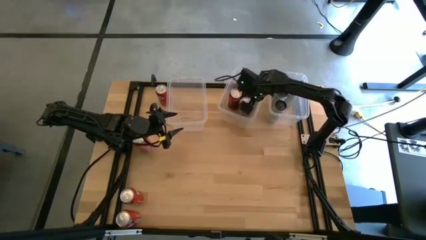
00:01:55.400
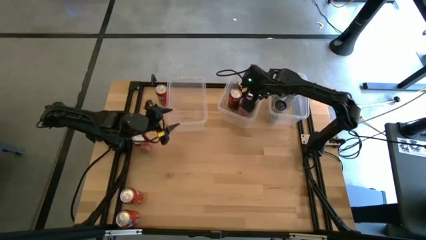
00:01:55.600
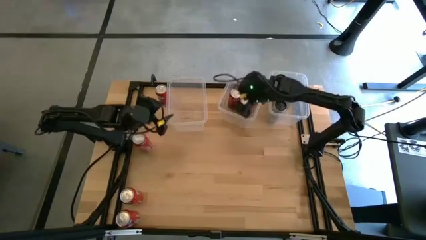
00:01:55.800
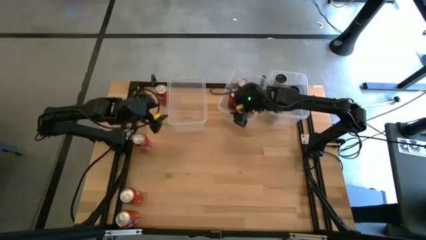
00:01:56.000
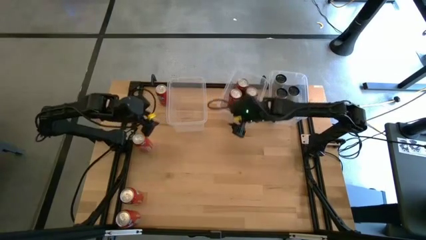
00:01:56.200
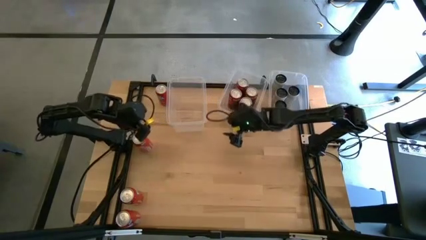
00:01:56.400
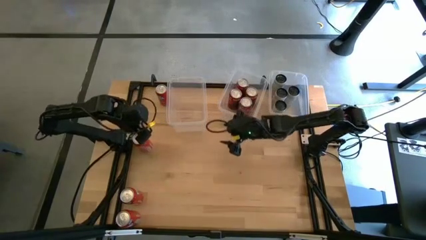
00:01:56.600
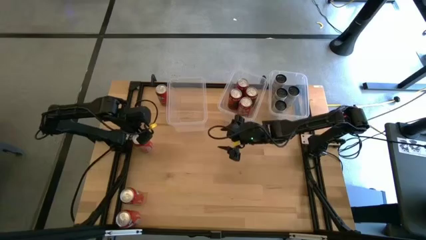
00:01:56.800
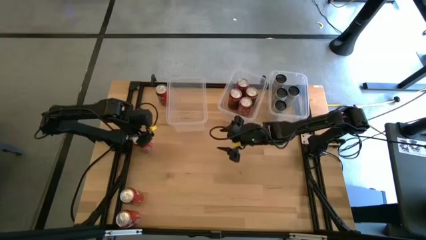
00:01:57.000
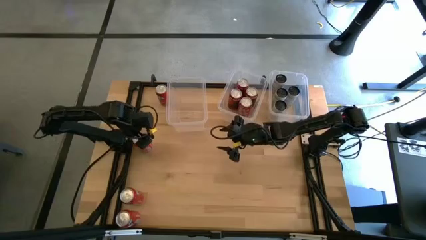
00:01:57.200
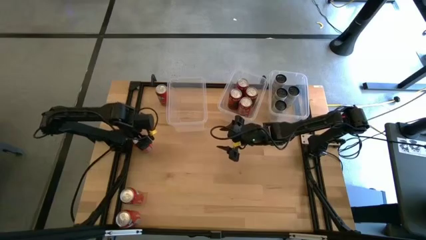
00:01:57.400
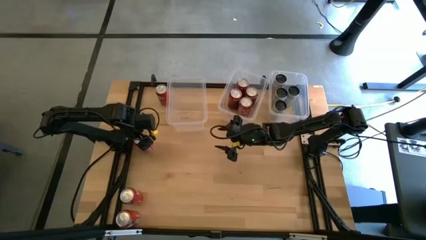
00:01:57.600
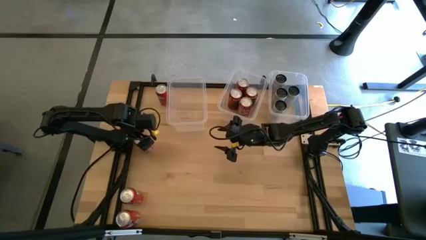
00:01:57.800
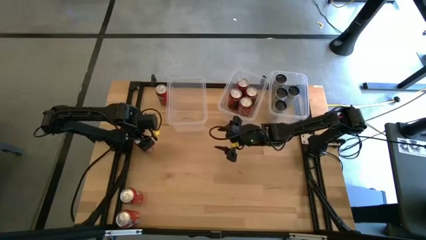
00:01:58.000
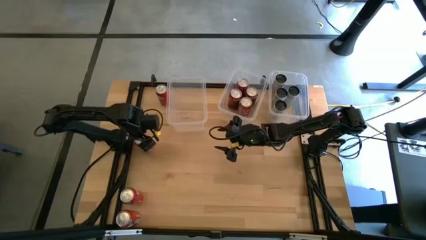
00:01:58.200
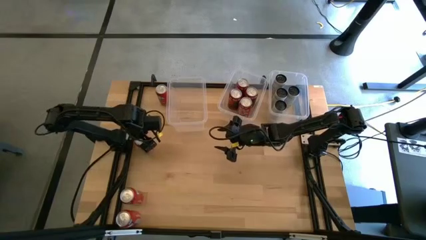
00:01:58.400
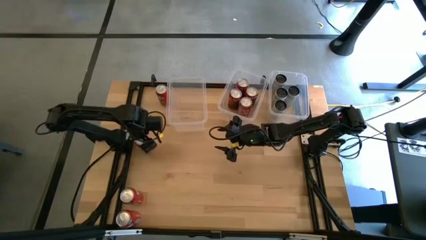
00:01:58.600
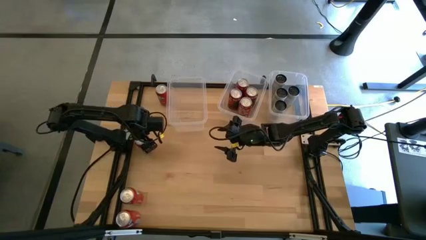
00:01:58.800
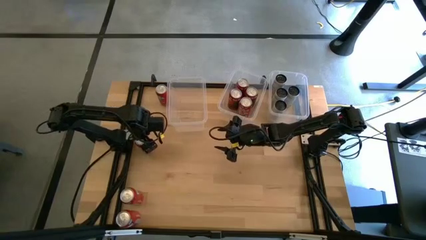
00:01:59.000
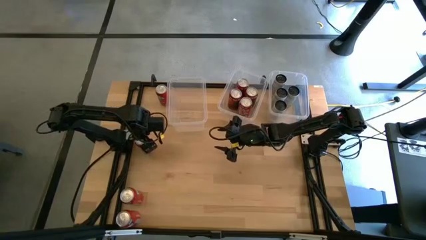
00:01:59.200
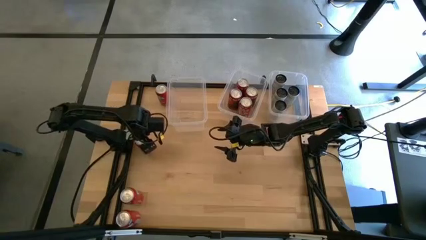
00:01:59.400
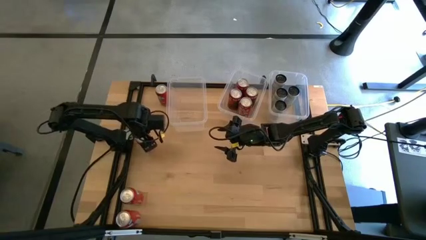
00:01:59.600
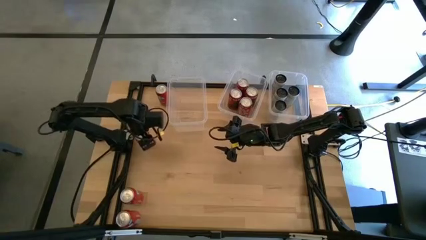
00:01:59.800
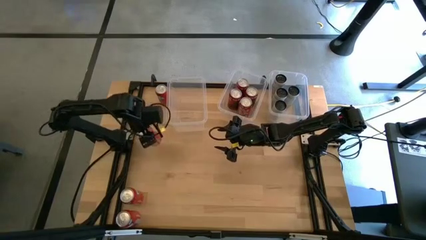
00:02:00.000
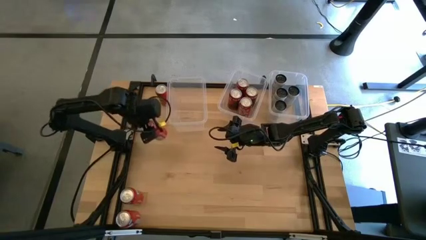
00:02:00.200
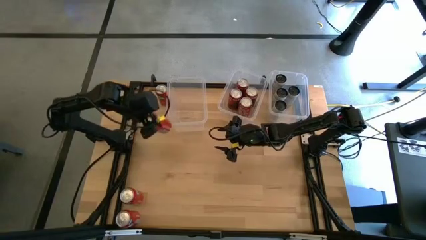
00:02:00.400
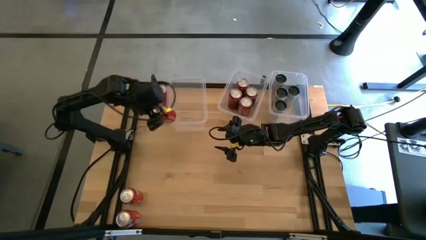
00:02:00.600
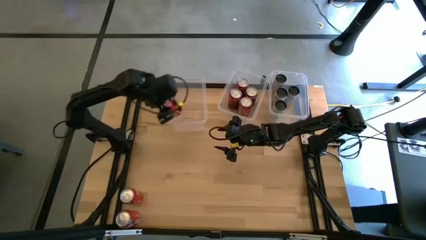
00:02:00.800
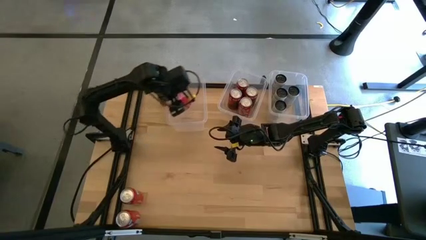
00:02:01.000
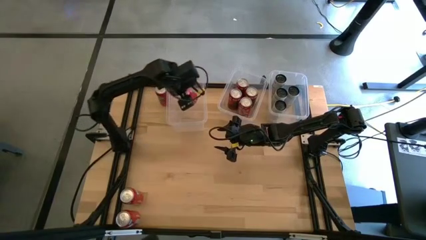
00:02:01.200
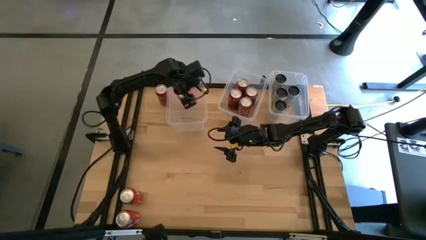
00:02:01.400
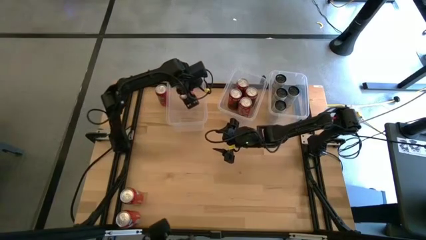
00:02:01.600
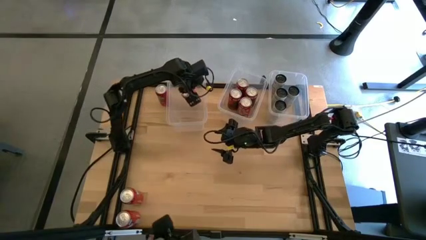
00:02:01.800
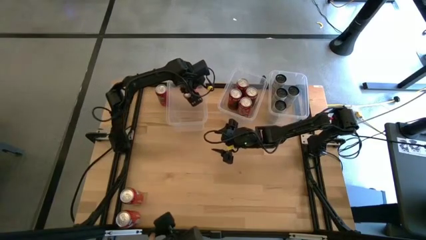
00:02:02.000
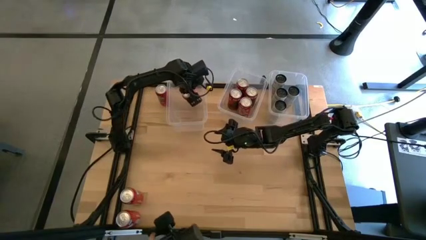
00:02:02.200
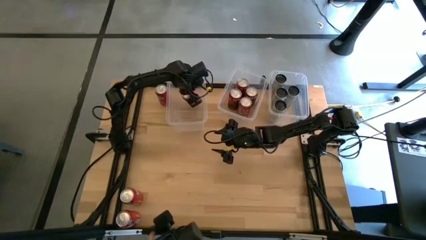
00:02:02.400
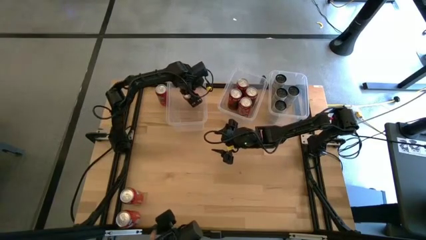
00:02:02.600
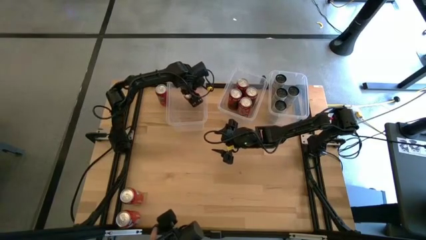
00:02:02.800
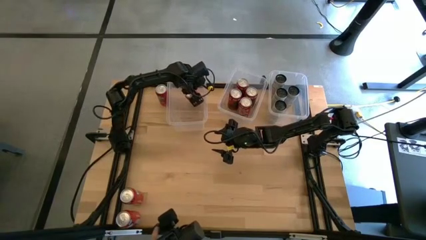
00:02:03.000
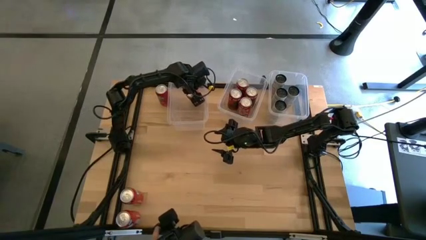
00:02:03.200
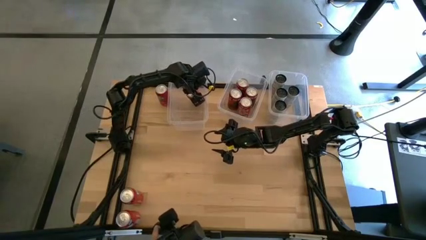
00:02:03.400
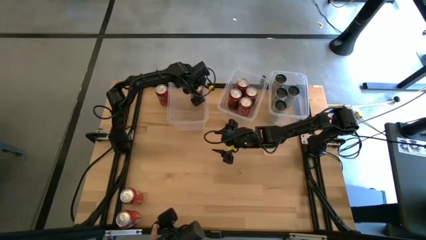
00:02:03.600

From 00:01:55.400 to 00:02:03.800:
Task: Sort soda cans
Put the middle top left orange soda can into the left transparent bin

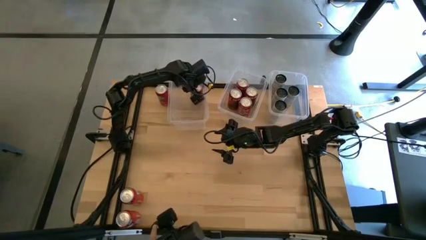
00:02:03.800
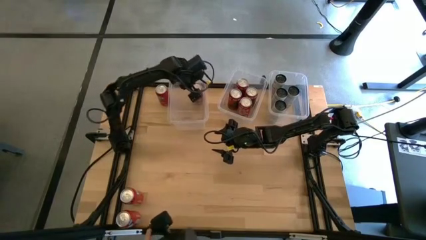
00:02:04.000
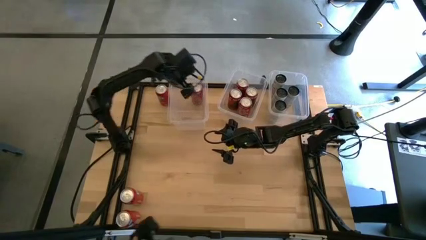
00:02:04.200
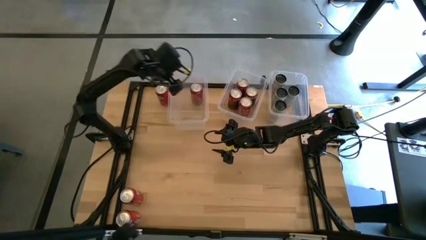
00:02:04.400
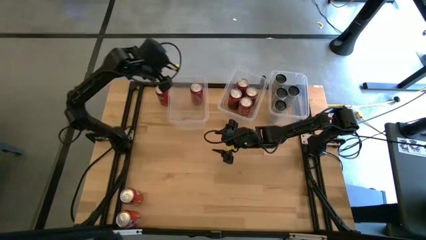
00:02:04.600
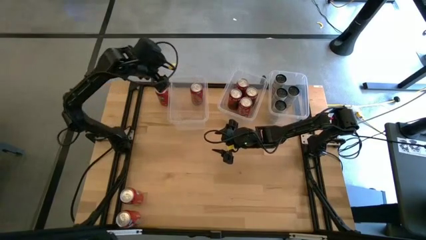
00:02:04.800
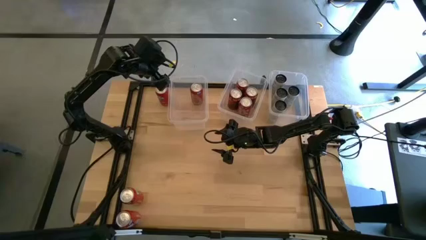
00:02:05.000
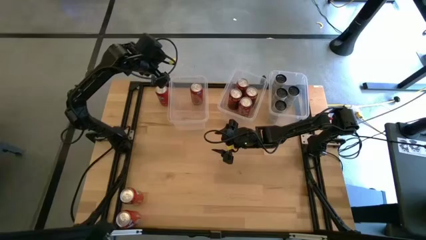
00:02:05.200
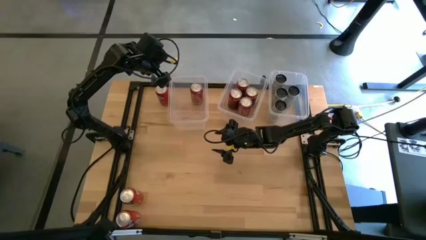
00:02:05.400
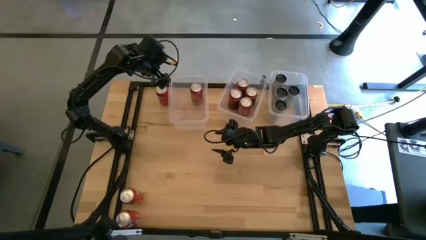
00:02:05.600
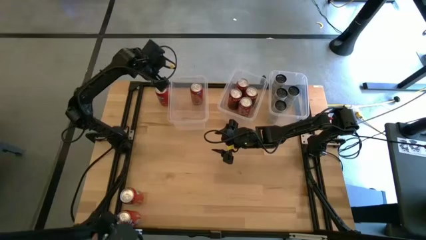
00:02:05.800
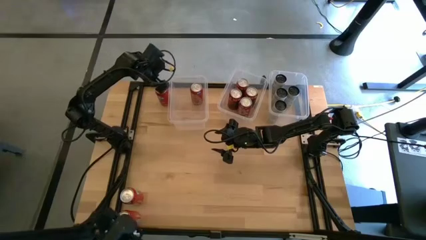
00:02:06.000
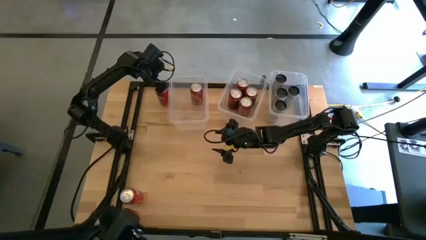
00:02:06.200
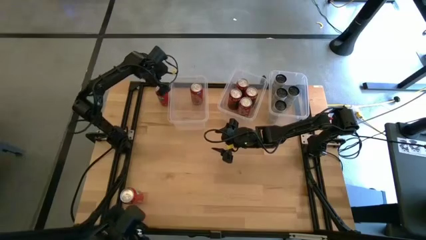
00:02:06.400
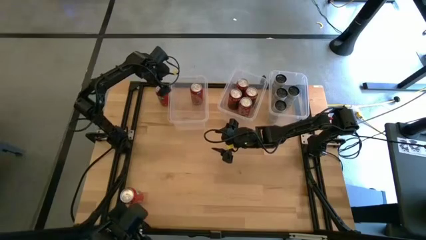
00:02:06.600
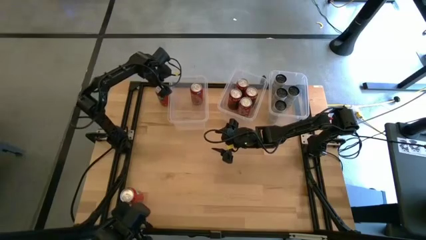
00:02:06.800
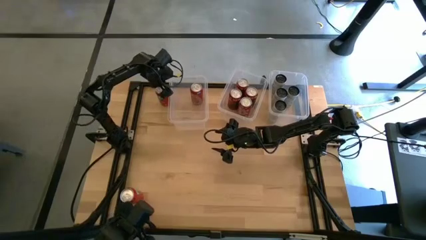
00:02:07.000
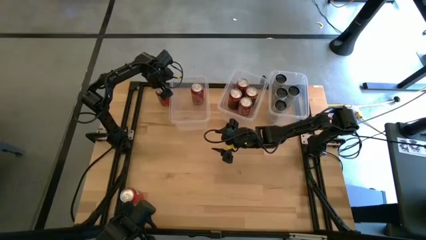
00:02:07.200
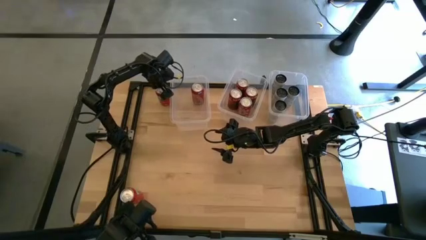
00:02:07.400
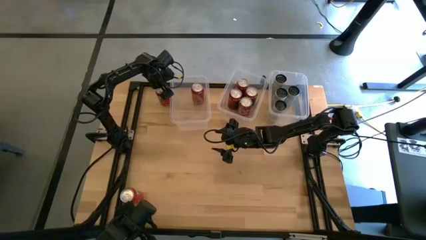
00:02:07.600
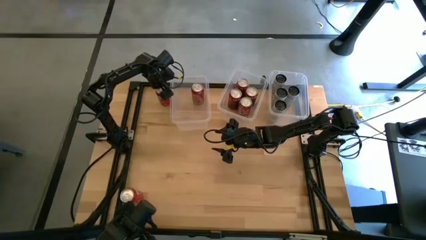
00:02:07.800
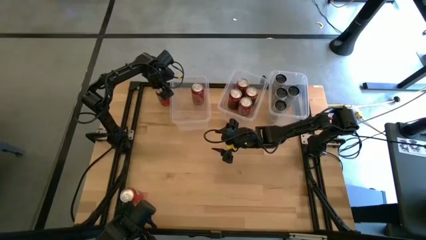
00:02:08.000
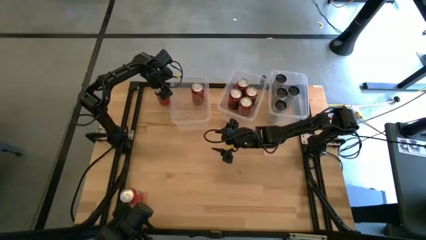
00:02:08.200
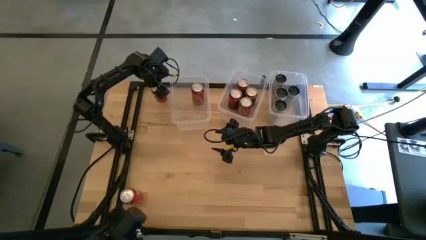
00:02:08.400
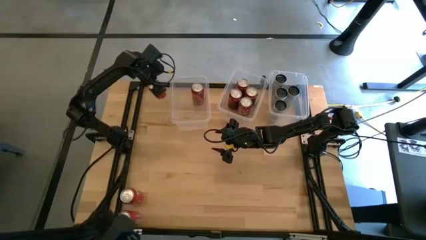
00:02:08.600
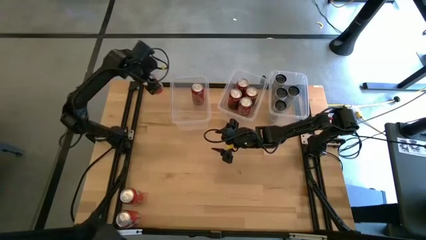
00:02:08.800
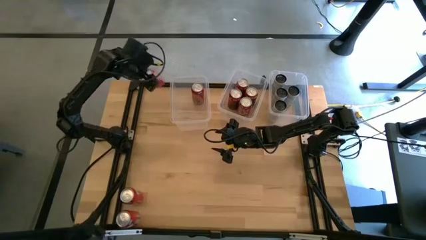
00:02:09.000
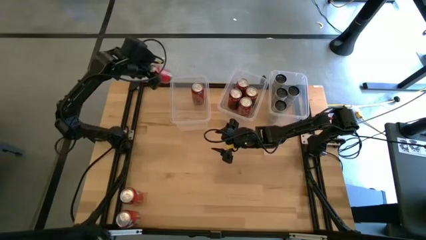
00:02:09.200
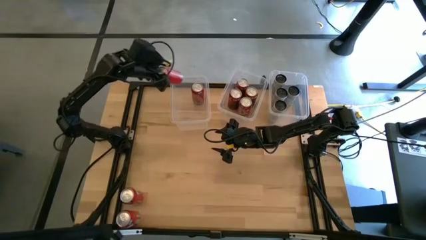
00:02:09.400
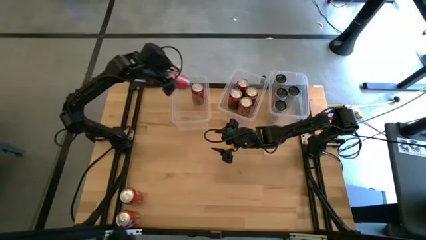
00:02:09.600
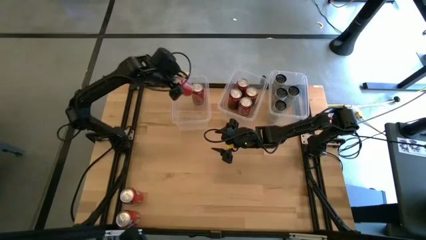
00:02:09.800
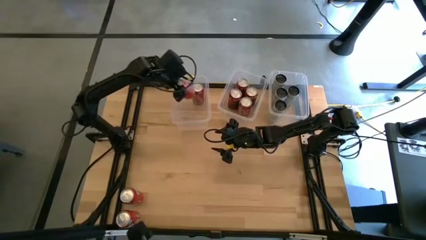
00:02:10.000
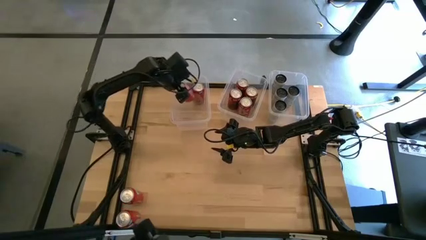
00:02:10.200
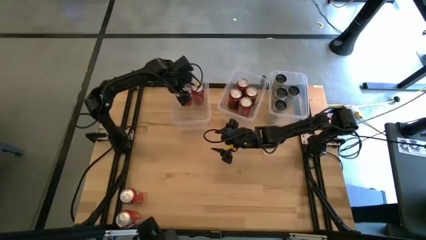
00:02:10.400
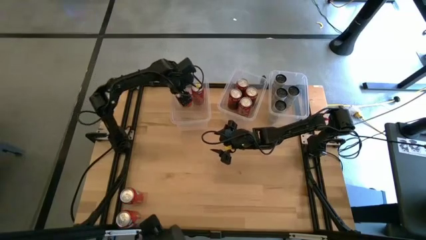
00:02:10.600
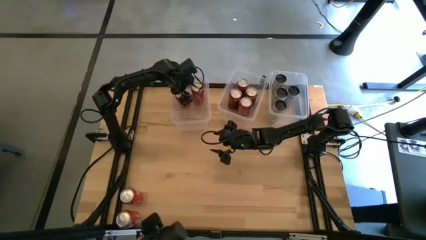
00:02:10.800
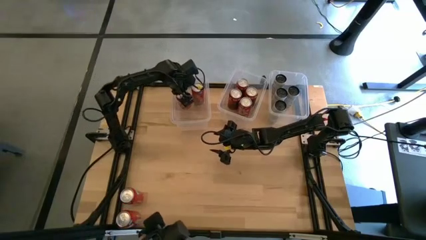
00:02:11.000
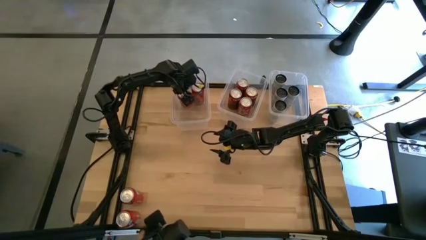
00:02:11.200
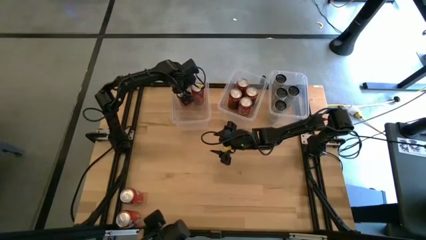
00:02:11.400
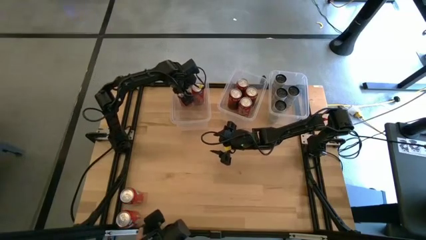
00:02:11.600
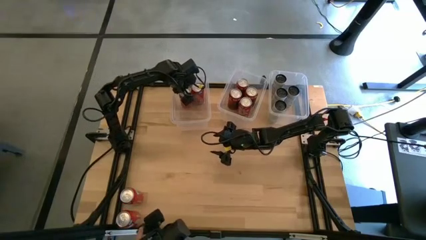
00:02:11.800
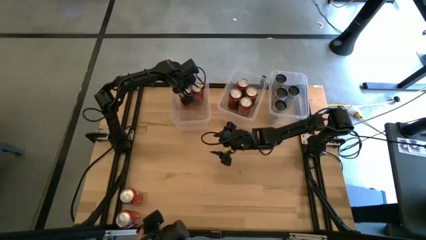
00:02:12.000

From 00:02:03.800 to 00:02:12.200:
Put the top orange soda can into the left transparent bin
